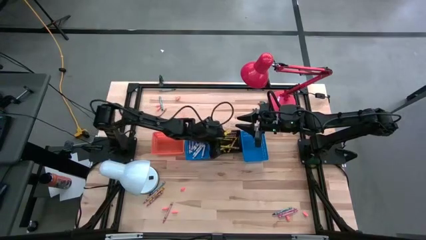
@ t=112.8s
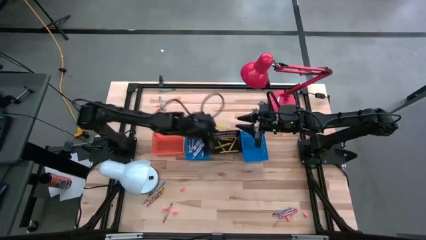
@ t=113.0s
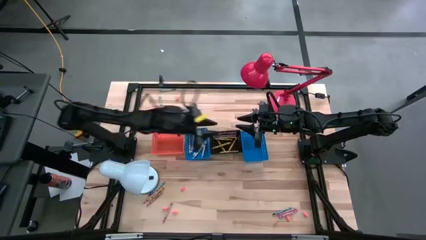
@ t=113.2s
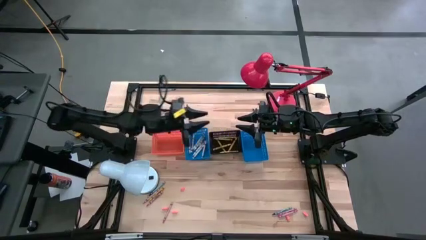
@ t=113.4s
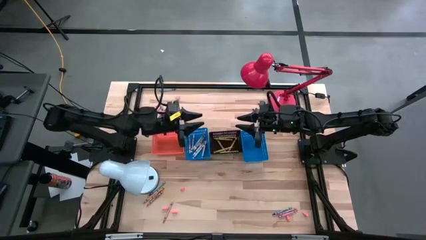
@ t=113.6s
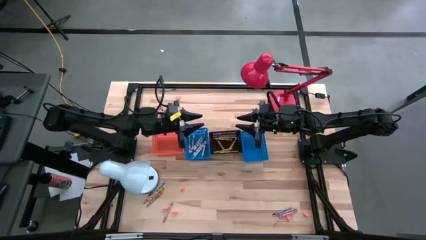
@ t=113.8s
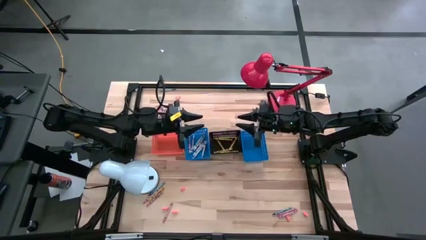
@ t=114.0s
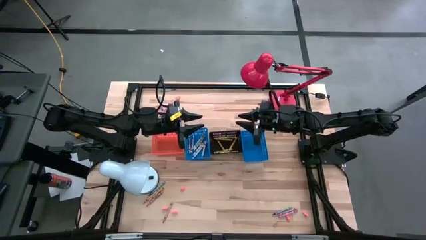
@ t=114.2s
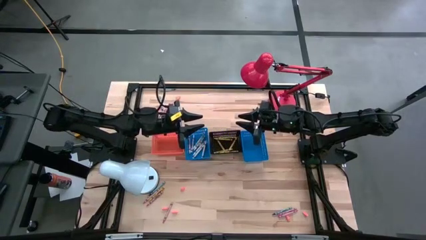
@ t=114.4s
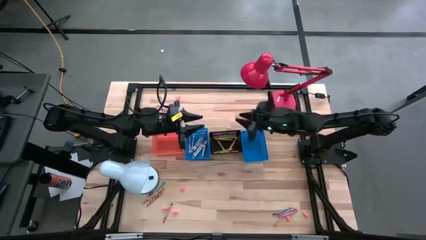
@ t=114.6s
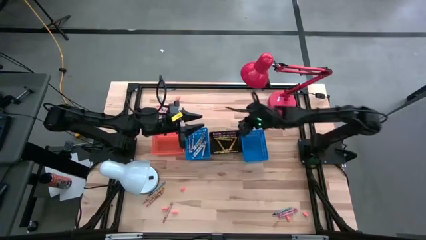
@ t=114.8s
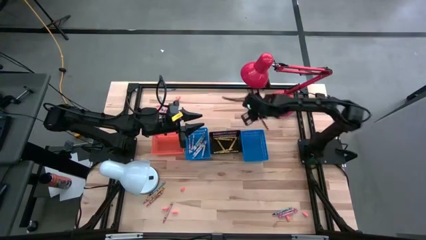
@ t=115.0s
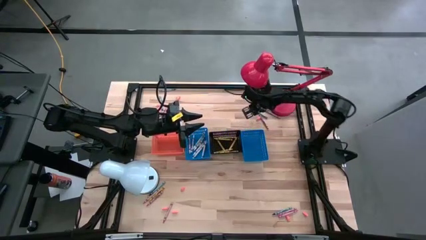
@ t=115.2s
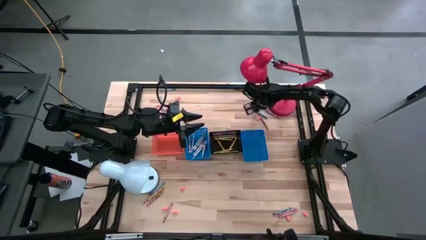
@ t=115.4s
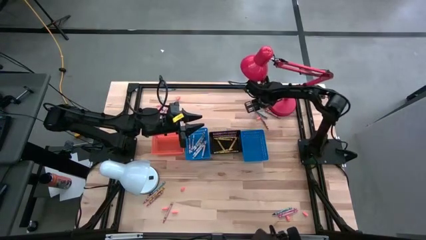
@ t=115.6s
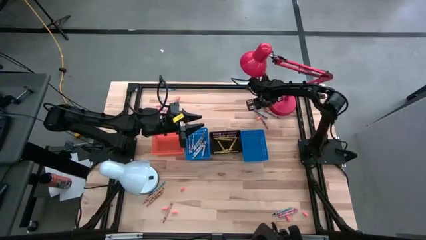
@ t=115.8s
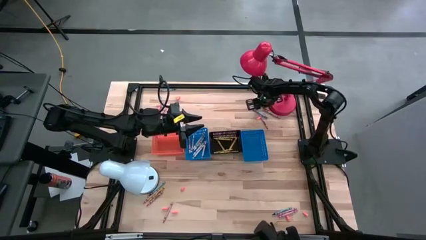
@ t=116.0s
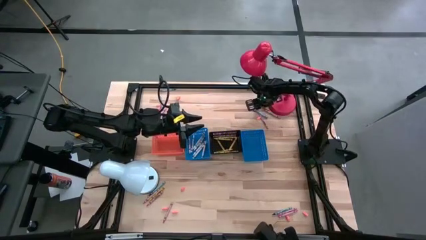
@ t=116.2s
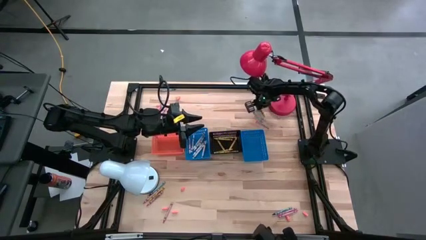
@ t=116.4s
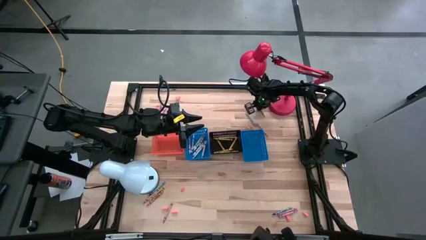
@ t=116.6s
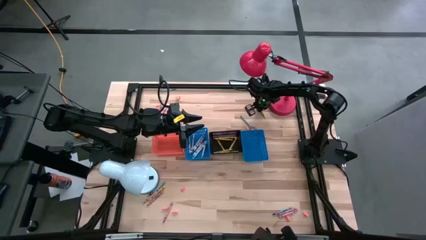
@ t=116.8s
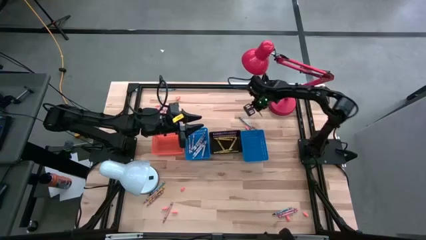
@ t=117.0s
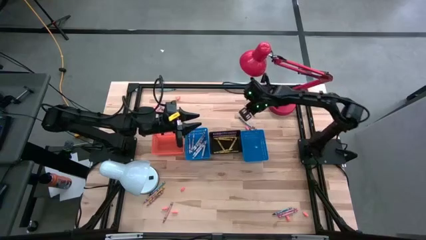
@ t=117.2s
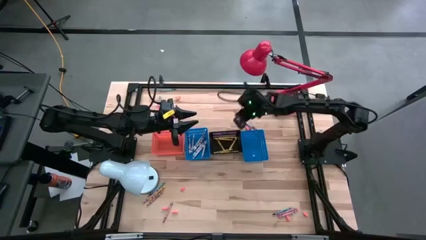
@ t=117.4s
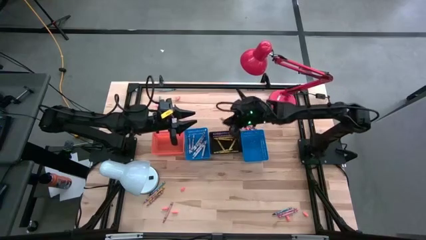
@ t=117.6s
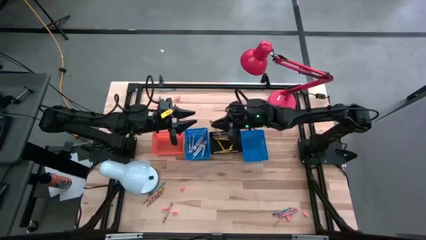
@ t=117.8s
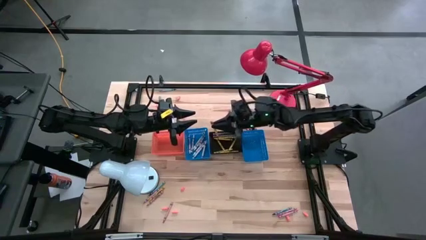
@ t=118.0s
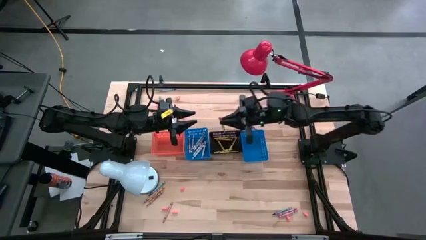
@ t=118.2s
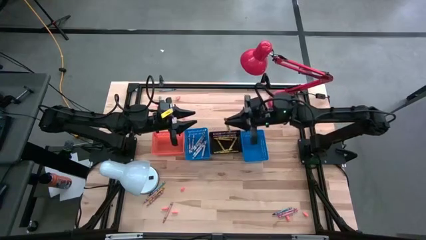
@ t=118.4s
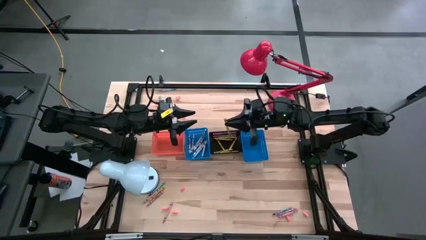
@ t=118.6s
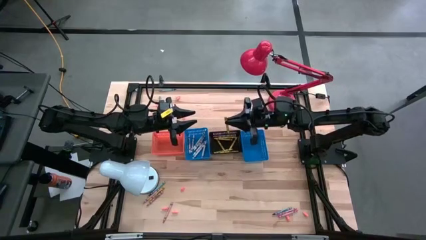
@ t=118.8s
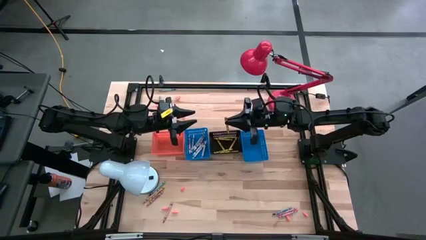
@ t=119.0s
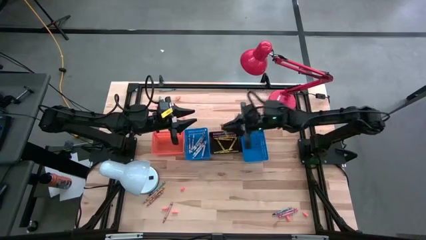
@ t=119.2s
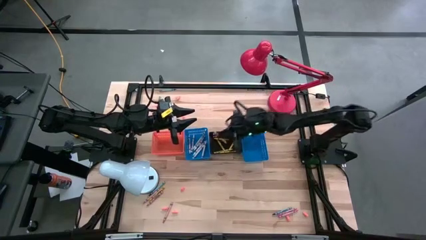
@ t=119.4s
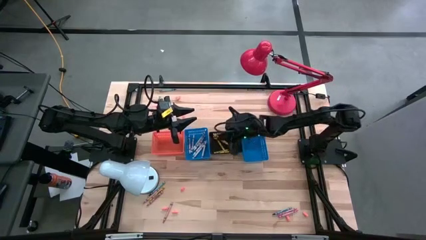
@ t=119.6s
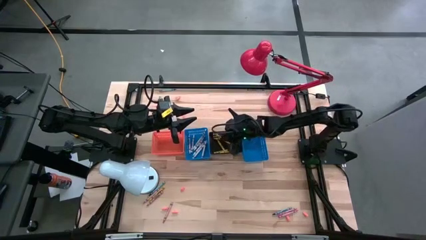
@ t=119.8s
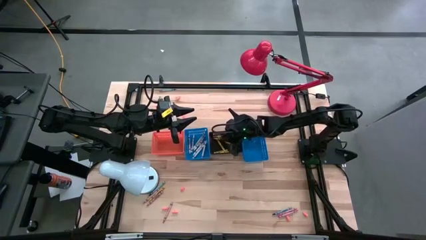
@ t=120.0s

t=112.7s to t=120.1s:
Task: Sort crayons
Put the right yellow crayon into the black bin

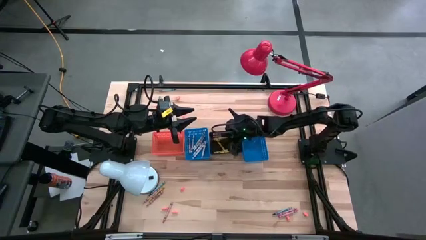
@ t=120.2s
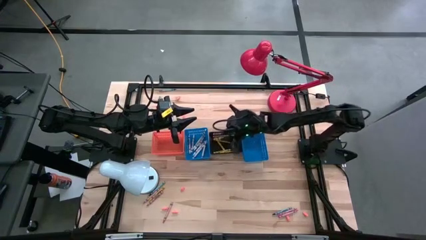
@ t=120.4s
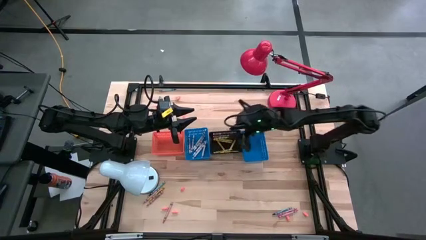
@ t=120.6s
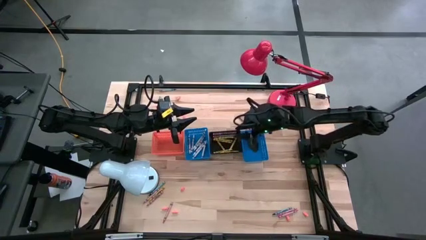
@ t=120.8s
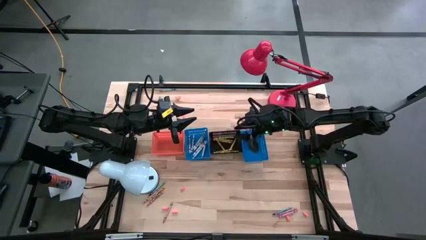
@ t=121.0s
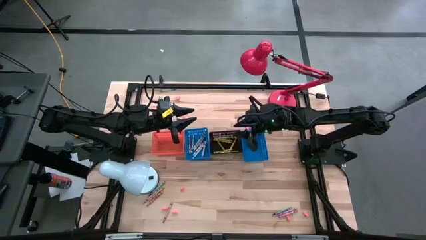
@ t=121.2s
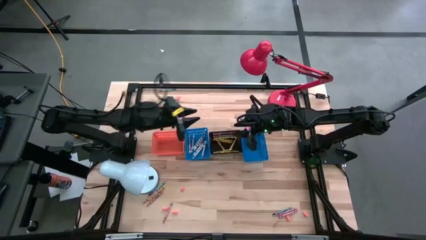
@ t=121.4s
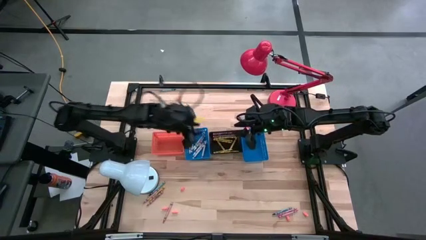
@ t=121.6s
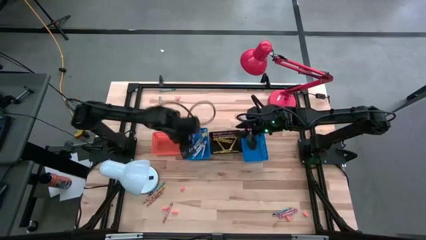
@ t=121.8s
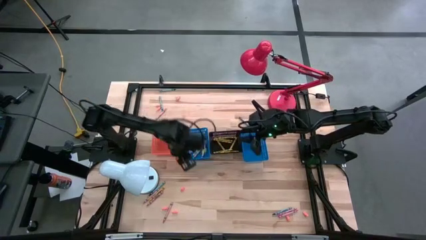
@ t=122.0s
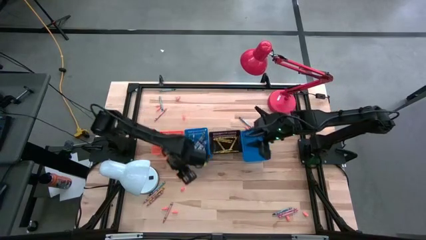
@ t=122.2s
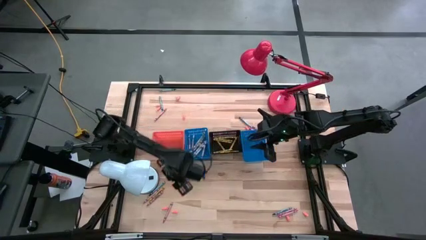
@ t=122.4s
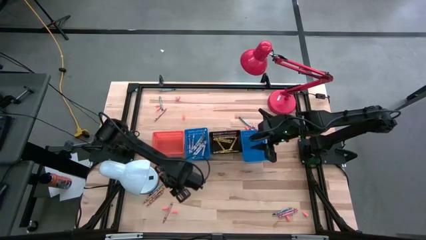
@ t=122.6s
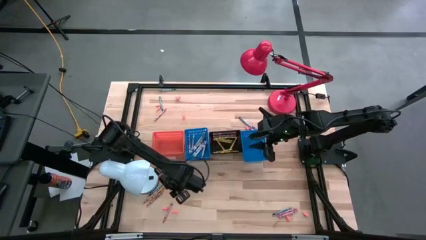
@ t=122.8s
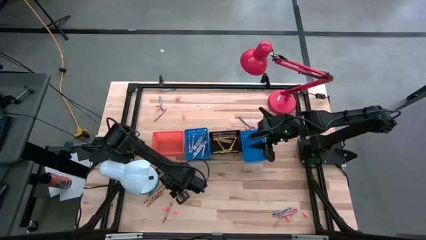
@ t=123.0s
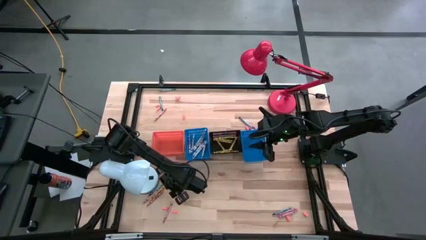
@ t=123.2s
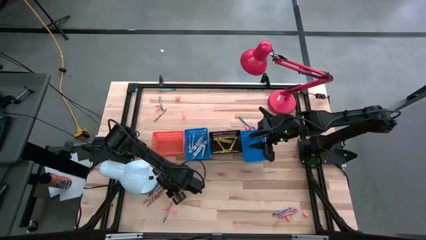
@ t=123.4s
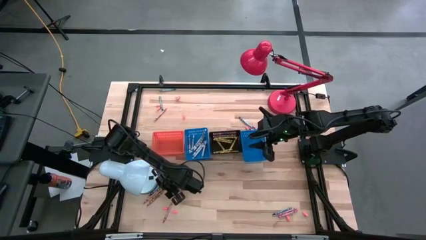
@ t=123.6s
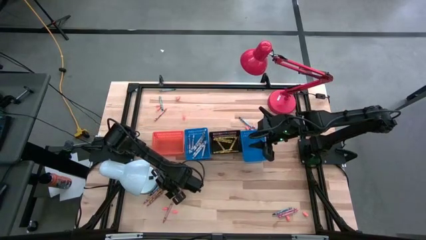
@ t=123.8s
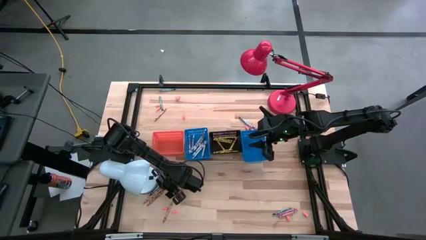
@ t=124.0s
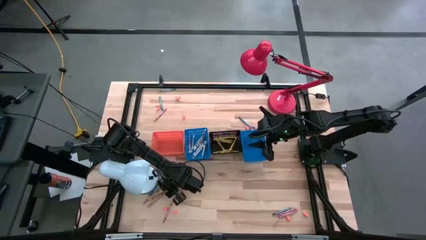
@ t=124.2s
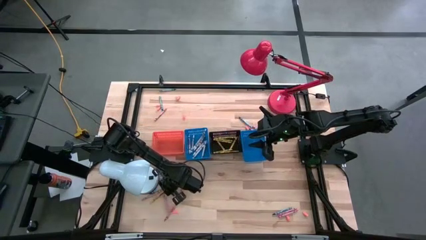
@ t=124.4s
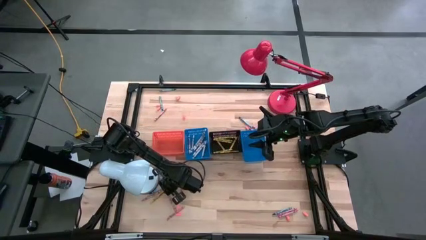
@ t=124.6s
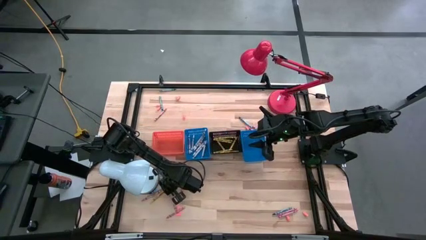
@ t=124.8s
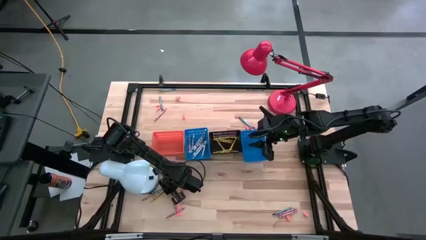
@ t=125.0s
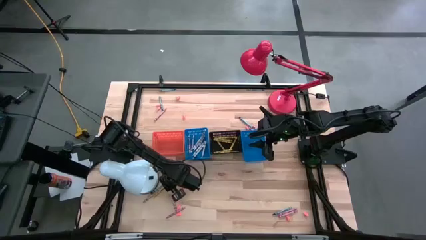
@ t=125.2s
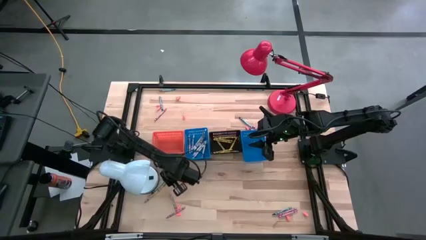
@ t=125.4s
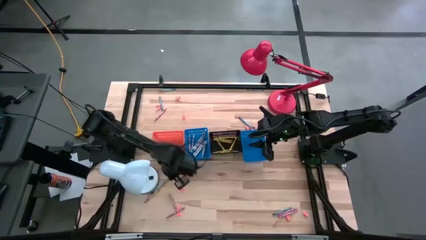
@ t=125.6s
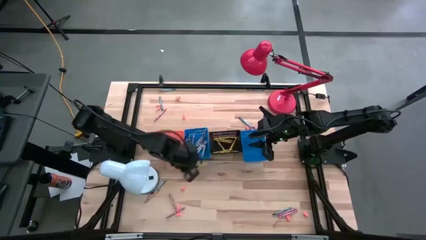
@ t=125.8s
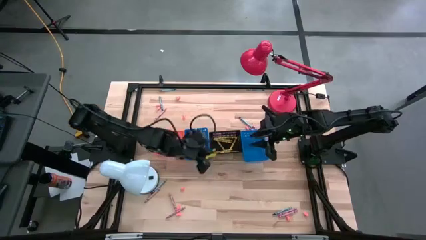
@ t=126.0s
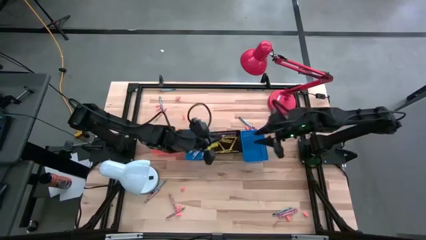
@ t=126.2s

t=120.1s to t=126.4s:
Put the yellow crayon into the black bin

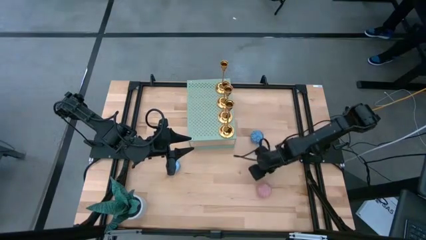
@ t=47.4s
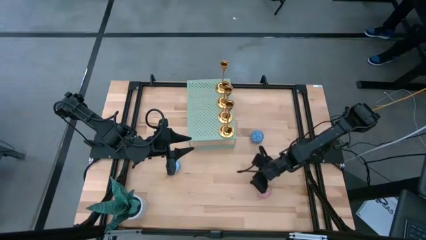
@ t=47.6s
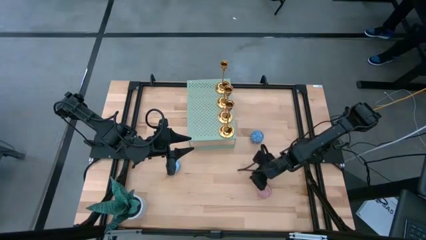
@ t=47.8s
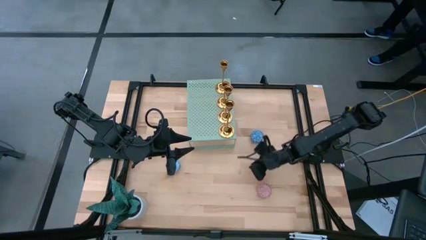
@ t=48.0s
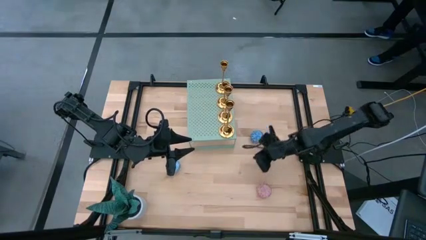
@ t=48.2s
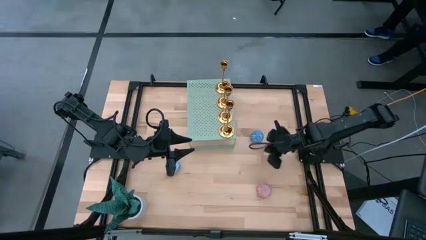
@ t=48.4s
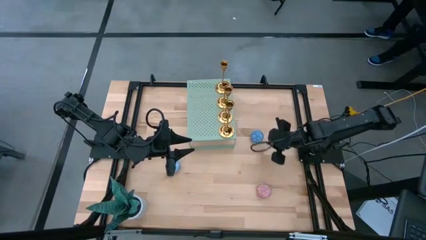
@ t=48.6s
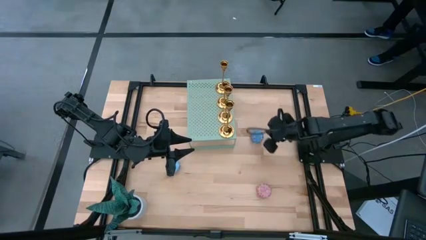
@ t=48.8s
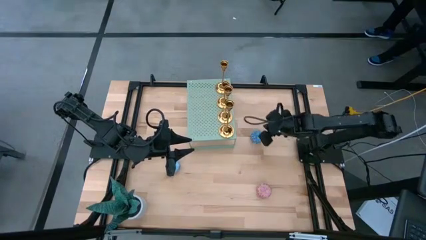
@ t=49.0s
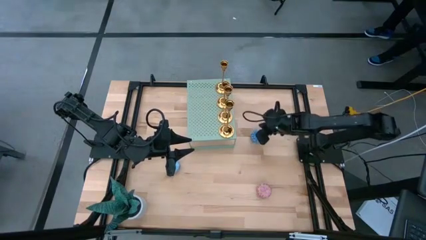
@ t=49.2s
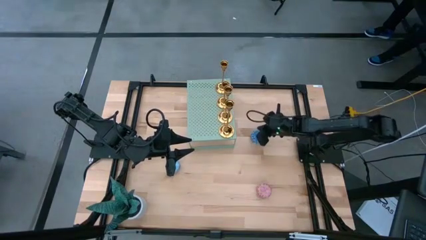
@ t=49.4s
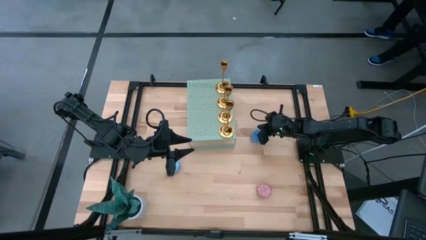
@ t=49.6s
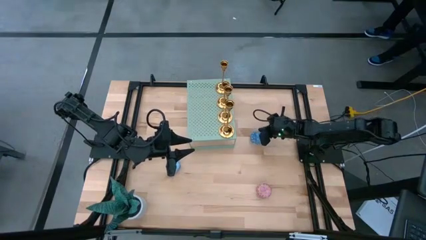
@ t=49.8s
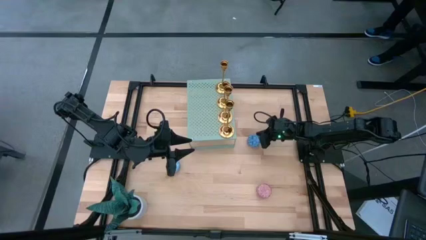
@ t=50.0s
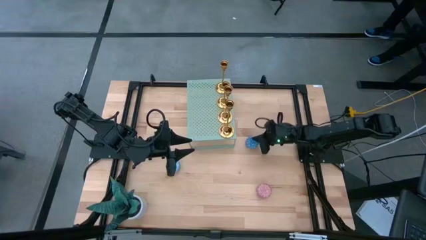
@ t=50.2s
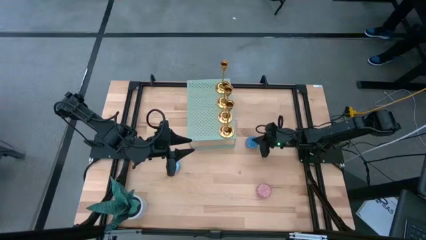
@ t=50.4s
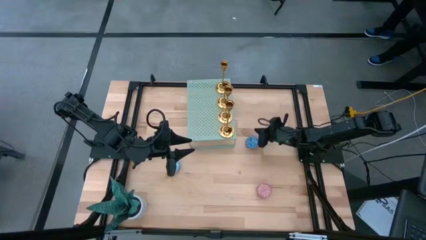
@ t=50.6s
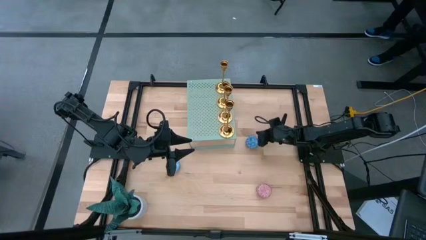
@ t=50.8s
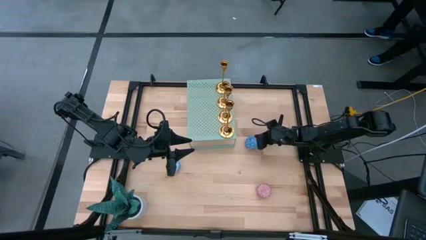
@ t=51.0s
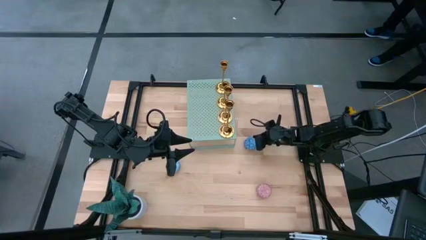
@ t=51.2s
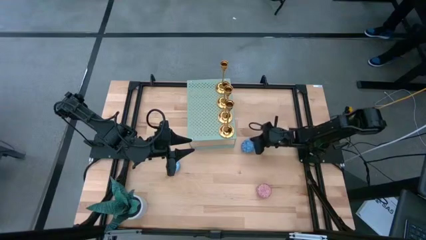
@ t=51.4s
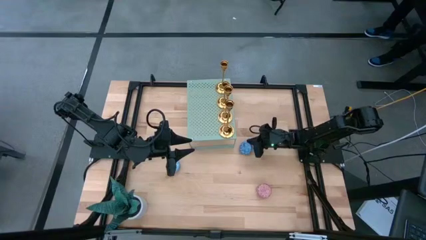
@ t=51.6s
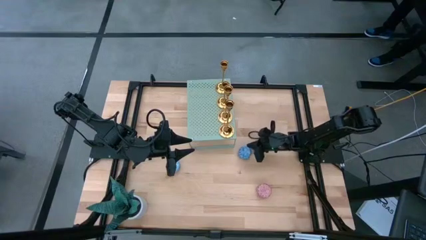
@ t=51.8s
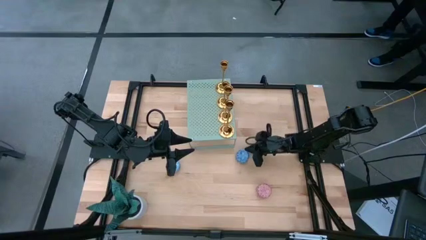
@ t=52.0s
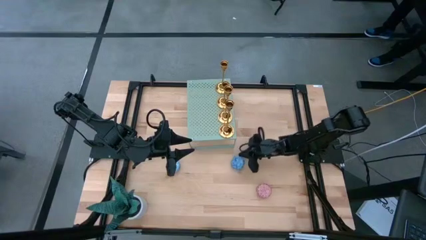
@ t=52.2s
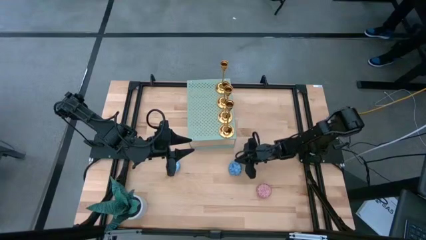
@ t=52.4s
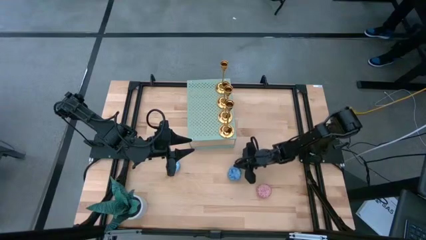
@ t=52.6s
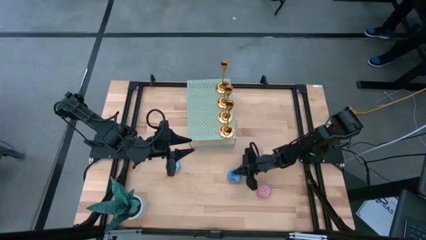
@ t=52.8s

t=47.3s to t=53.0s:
Task: Pick & Place candle stick holders
Move the blue scented candle to the bottom right
